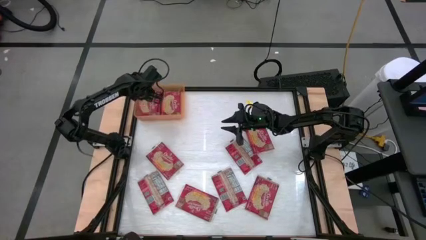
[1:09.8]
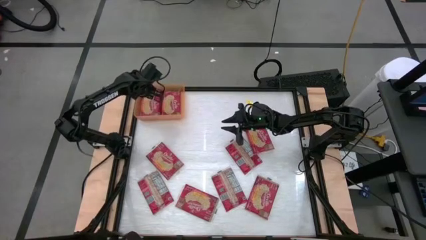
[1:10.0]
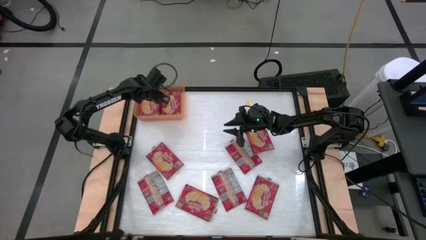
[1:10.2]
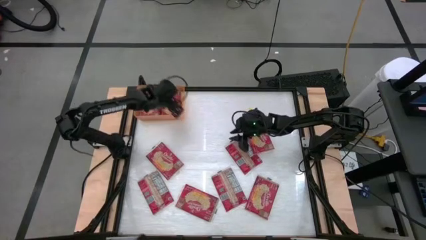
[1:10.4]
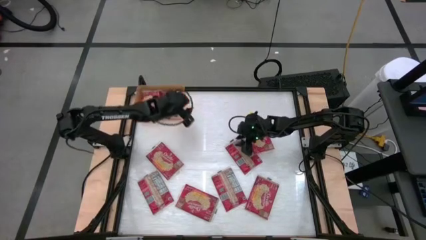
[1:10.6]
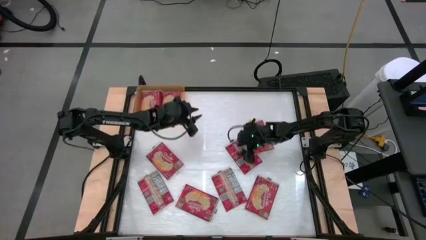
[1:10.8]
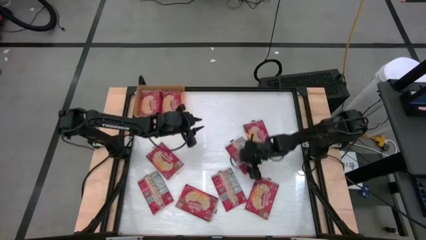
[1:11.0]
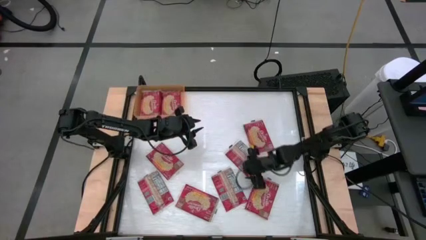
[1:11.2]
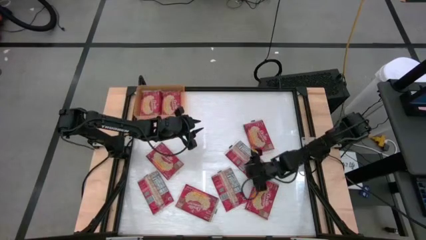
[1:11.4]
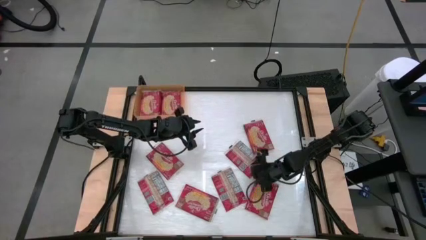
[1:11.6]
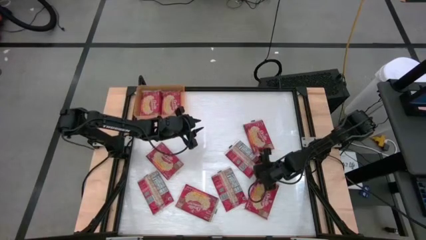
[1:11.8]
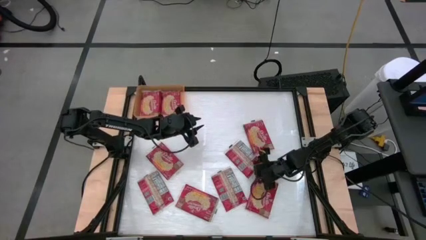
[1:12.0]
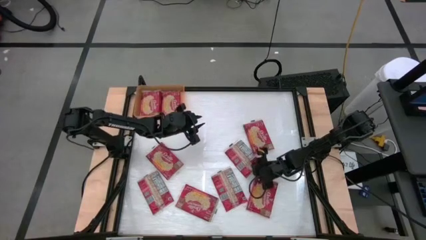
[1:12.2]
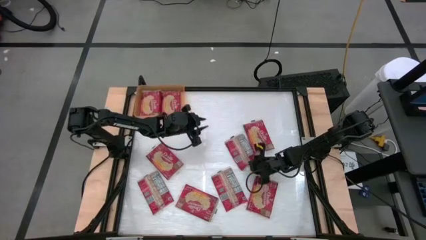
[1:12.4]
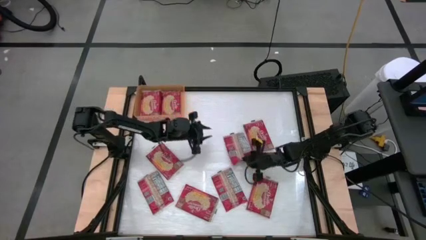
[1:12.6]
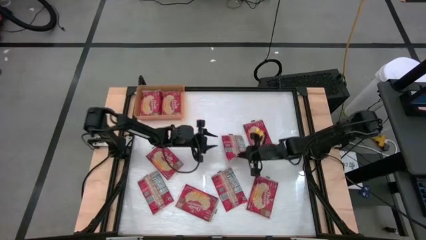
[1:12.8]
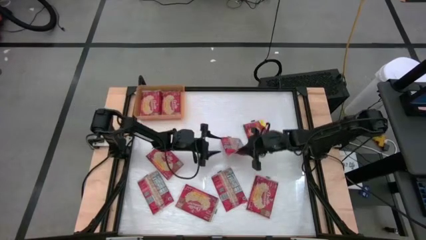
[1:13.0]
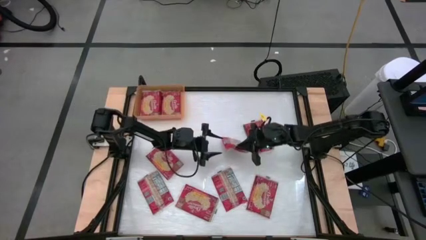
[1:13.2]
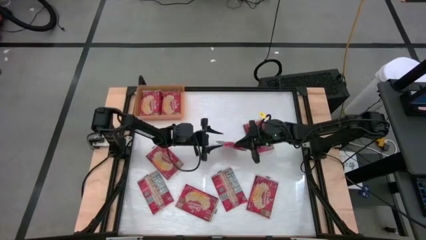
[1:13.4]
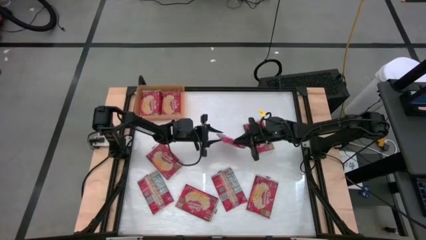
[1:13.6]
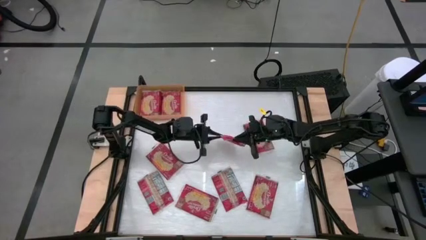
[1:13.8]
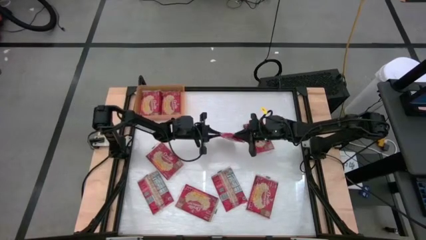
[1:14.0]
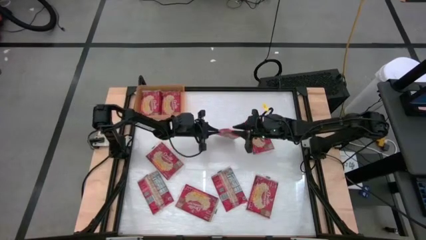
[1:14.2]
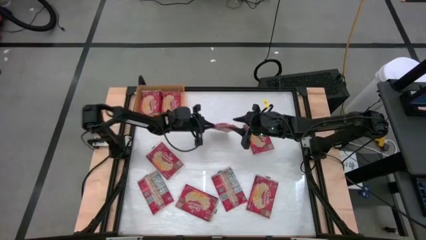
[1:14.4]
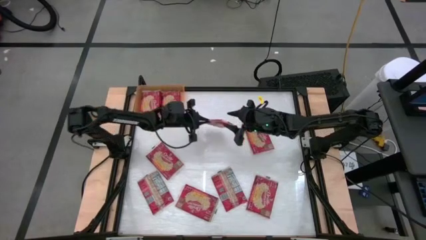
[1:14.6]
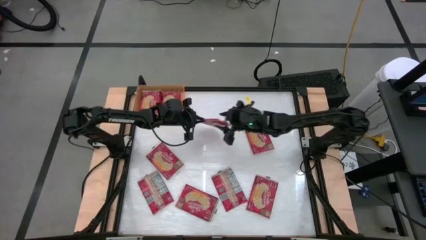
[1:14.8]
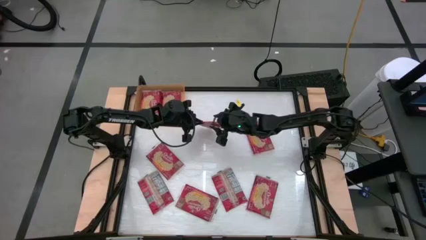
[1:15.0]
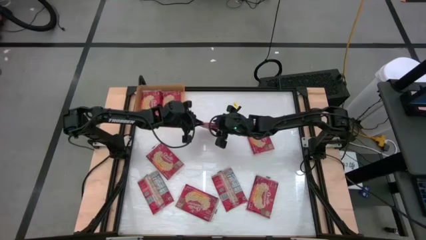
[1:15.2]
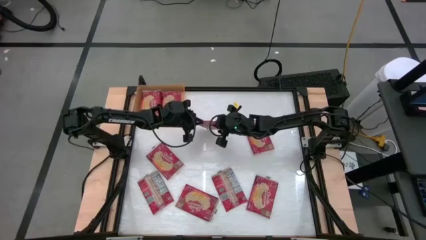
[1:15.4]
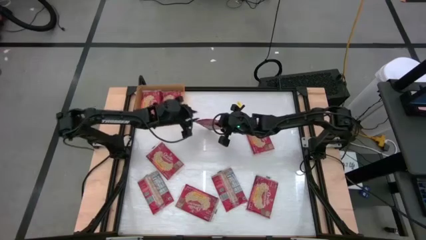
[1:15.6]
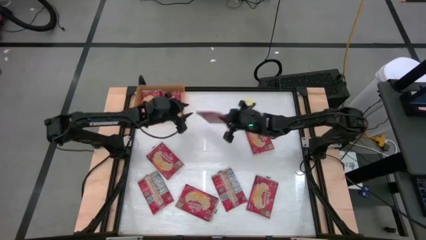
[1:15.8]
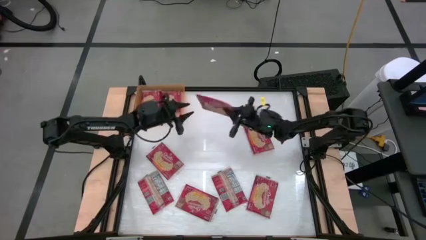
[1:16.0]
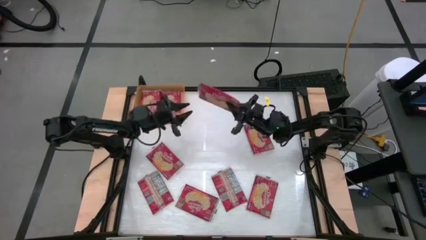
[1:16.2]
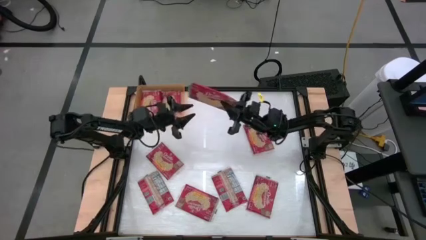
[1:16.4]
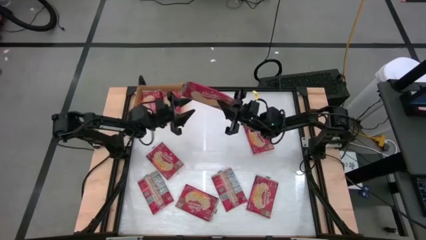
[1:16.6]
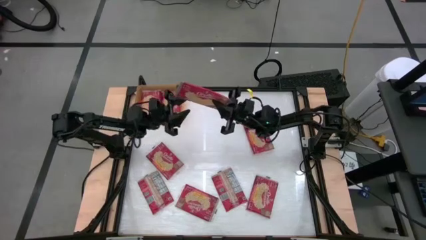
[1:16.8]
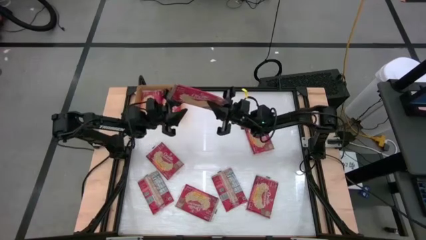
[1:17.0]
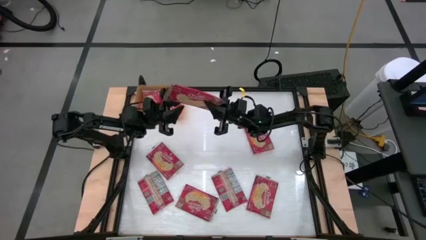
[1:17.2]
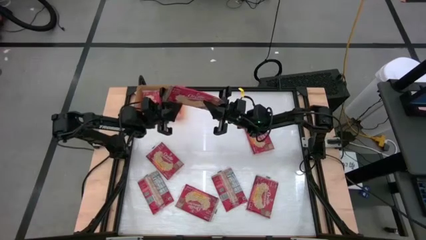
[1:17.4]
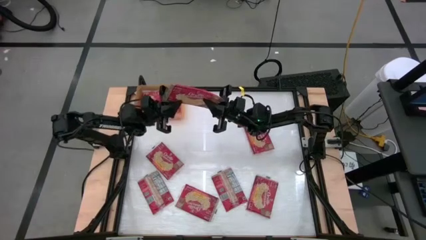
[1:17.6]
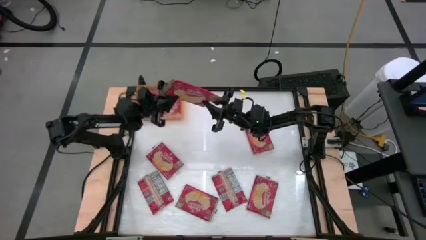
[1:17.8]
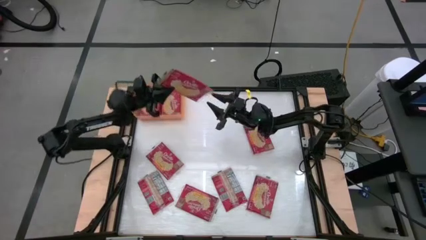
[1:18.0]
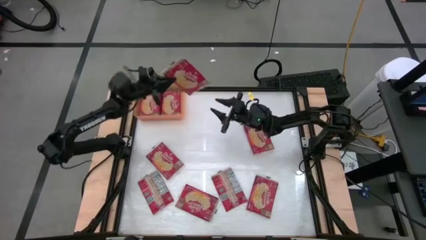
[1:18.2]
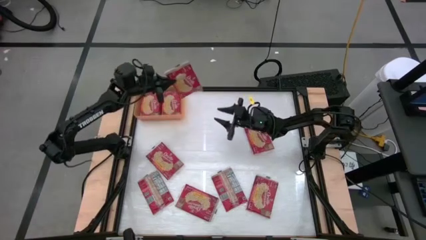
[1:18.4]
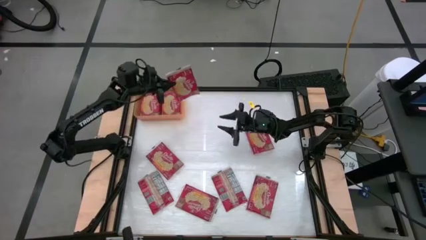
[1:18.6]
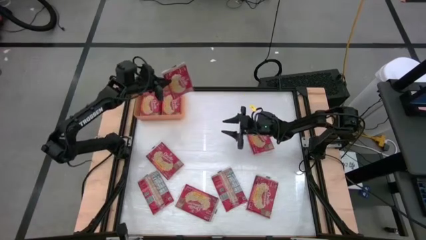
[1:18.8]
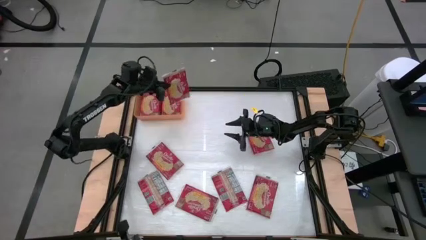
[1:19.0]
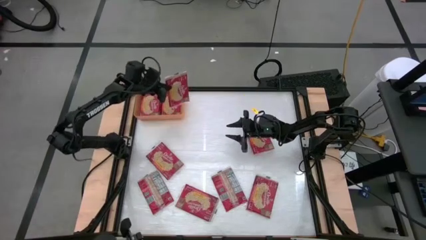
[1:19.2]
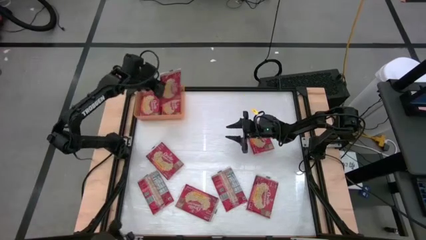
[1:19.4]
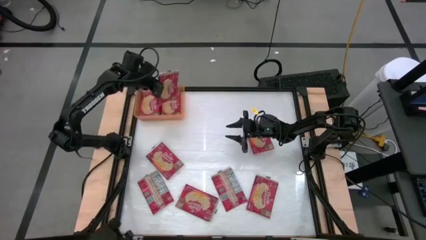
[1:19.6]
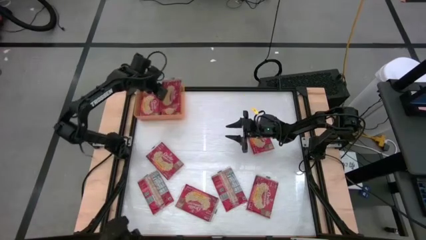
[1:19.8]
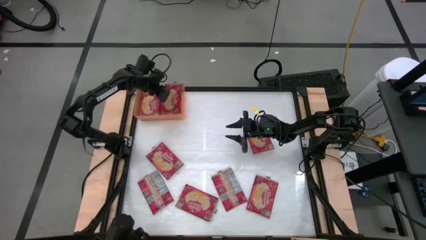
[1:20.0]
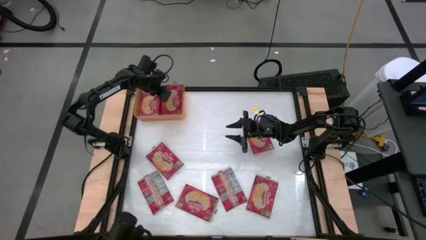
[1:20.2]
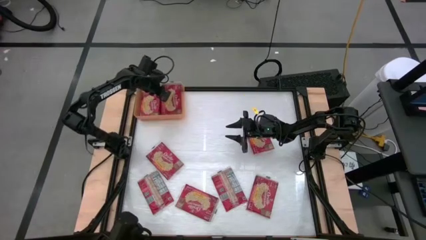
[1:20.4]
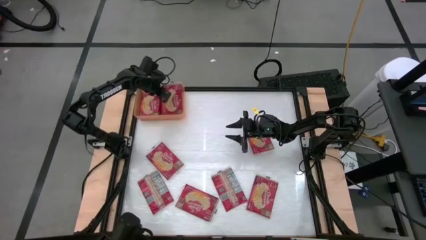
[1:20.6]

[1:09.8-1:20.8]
Task: Sort popcorn bags into baskets
Put the red popcorn bag into the orange bin

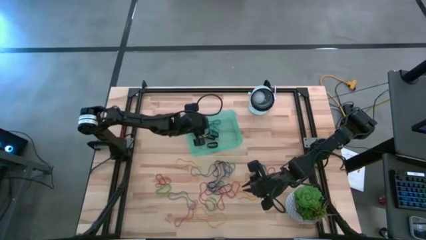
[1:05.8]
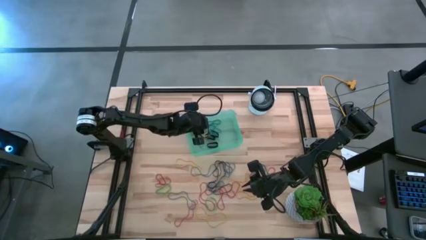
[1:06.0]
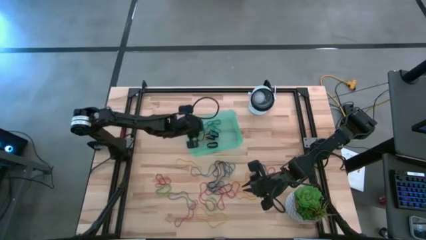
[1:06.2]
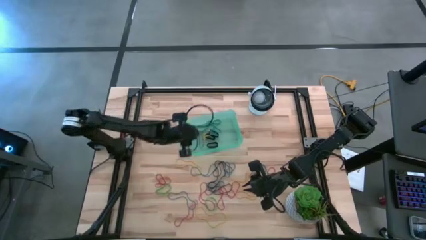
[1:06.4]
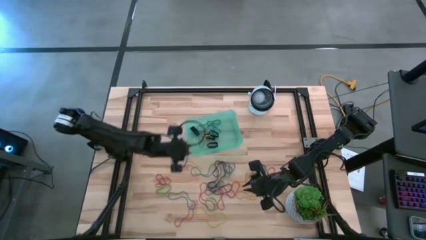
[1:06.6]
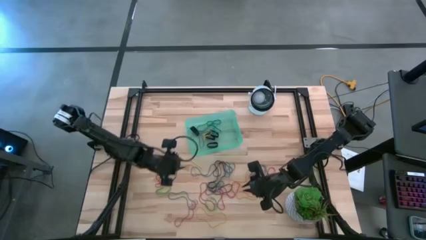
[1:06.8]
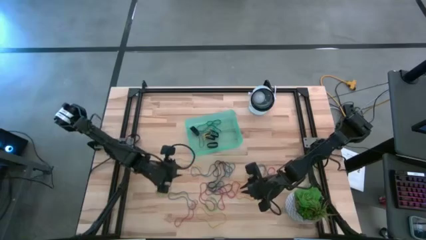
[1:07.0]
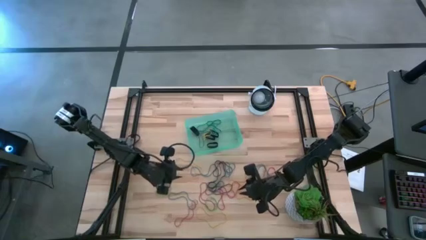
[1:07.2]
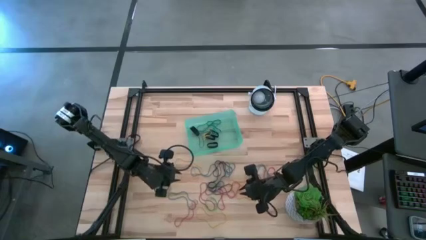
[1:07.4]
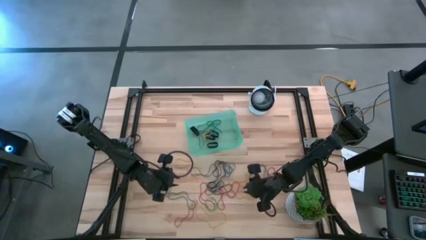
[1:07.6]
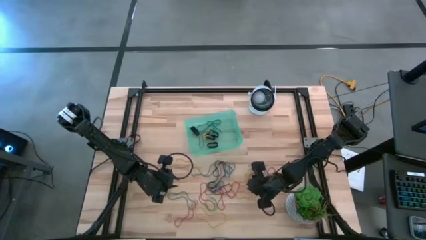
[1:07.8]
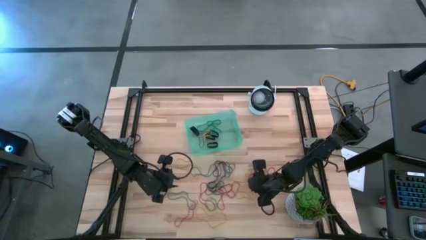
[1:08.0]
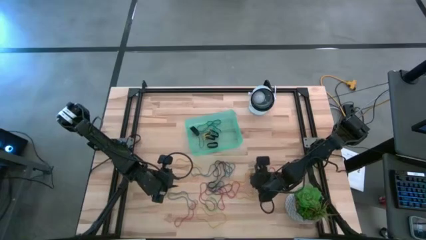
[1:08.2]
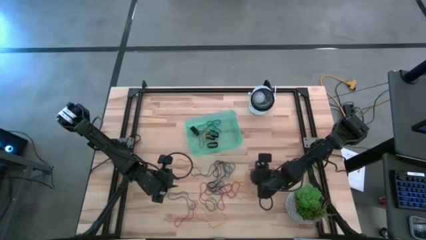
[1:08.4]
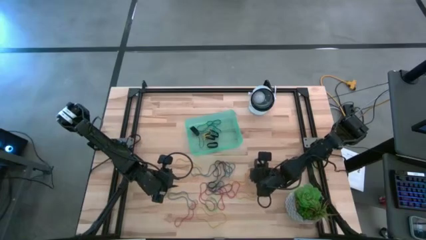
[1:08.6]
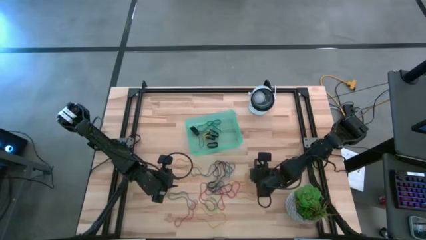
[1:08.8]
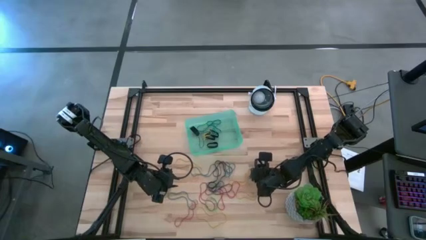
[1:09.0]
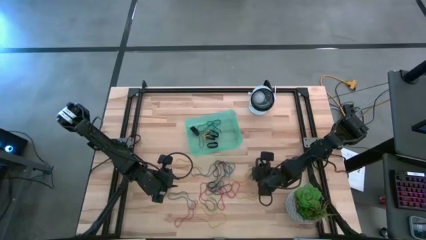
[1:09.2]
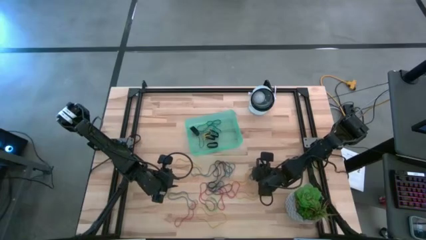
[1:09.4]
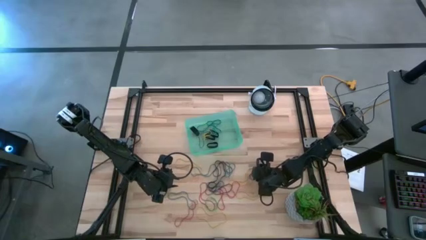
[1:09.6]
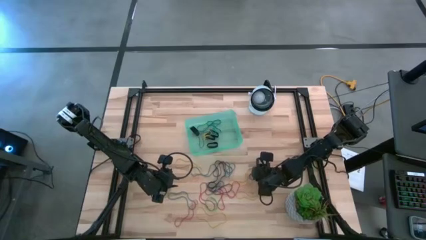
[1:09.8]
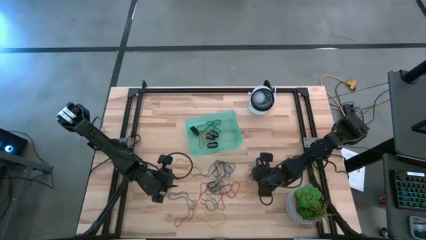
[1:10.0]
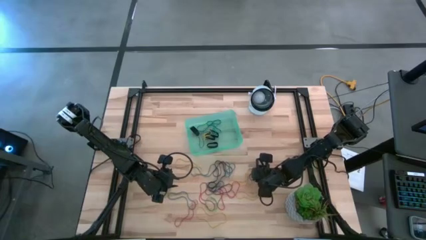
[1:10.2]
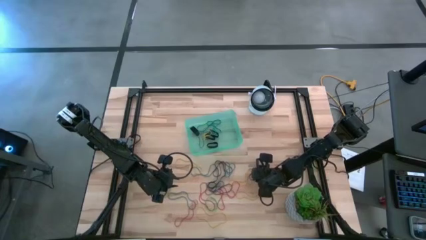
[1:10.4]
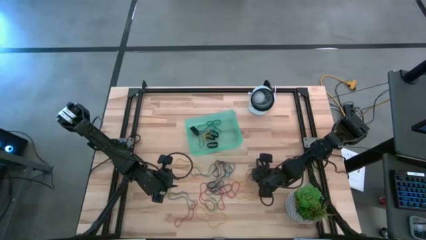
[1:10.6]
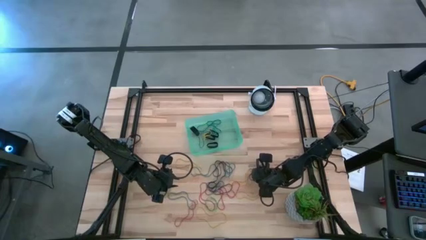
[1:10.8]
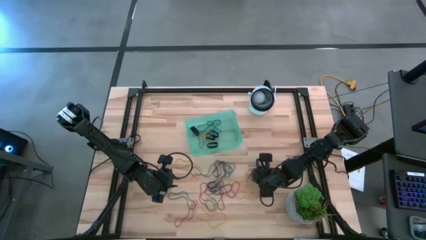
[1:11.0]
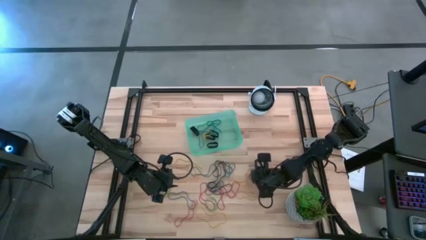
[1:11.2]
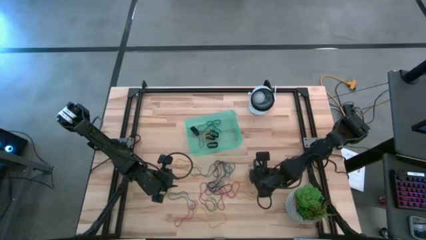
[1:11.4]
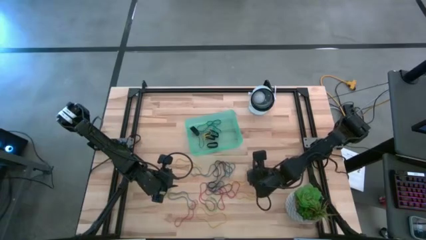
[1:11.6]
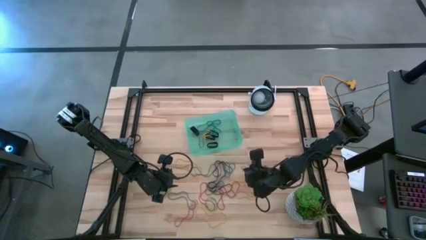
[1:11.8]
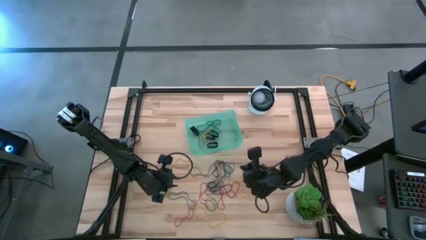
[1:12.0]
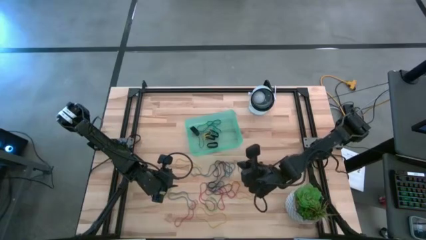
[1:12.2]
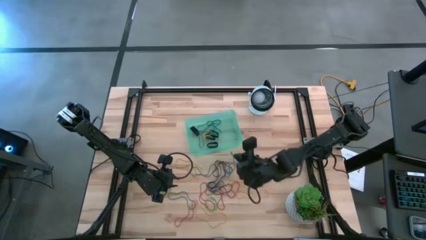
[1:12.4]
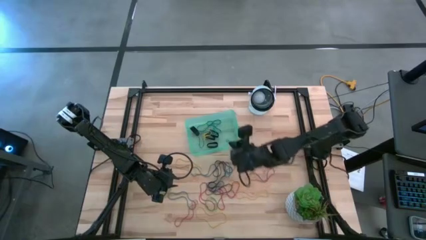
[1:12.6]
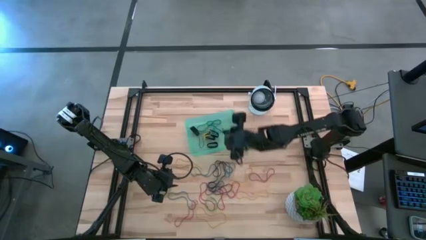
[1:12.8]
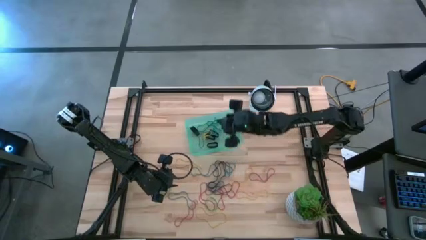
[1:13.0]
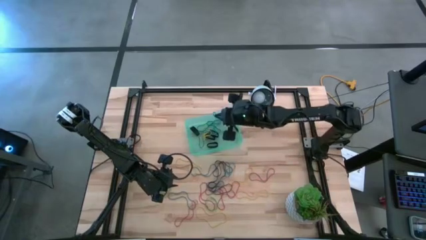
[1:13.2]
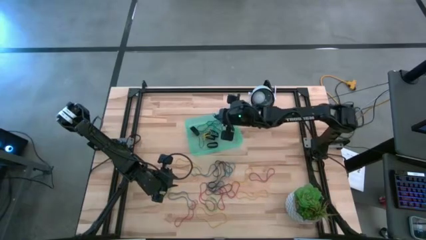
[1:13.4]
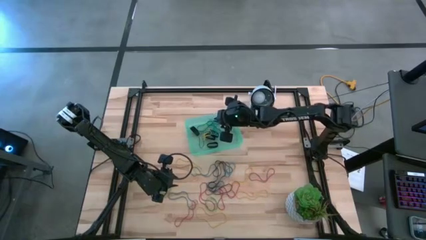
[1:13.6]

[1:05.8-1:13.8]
Task: Pick and place rubber bands into bin
Put the blue rubber band into the green bin
